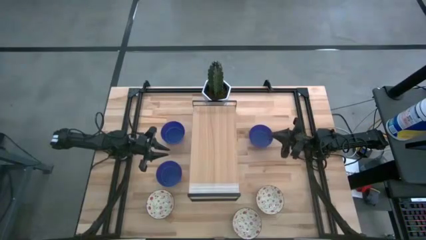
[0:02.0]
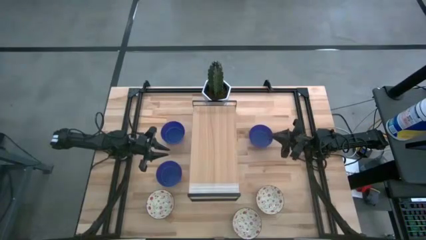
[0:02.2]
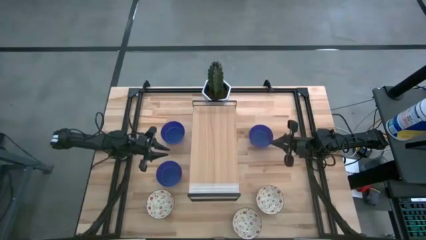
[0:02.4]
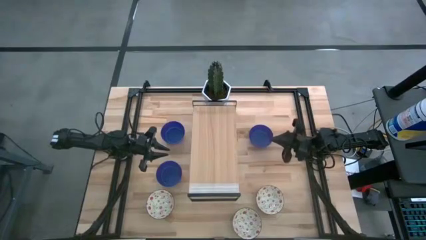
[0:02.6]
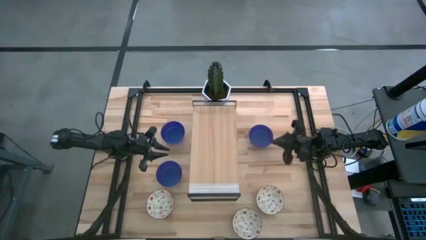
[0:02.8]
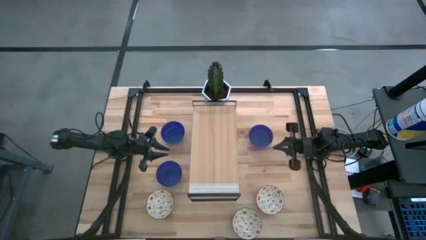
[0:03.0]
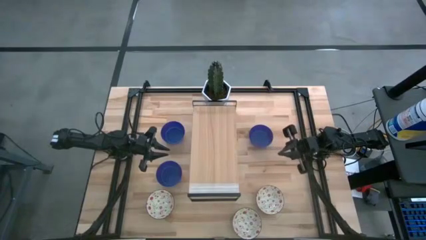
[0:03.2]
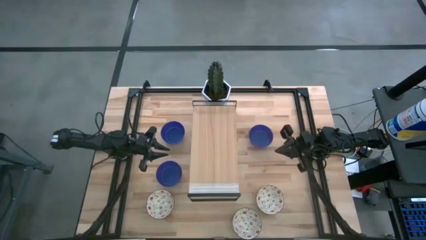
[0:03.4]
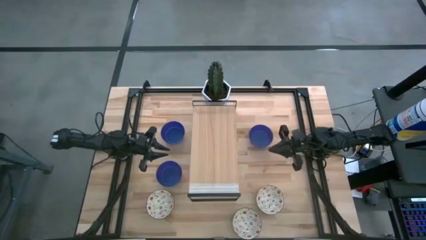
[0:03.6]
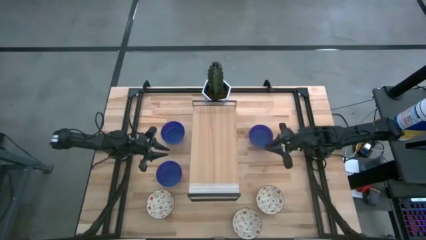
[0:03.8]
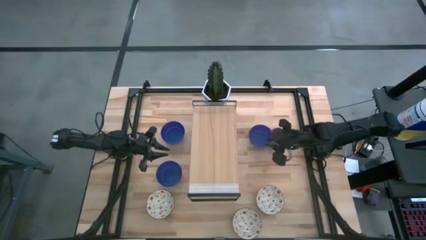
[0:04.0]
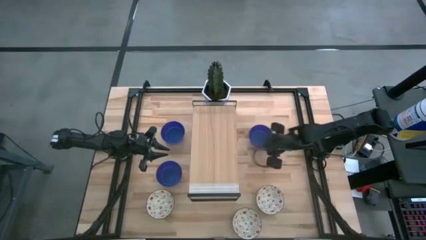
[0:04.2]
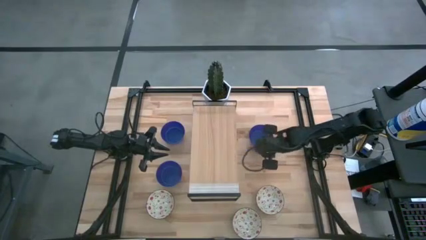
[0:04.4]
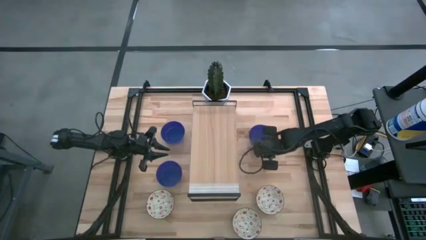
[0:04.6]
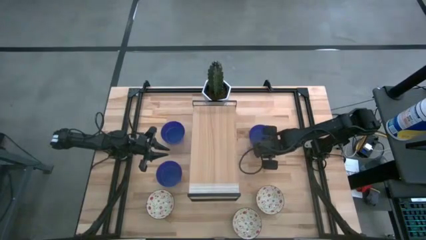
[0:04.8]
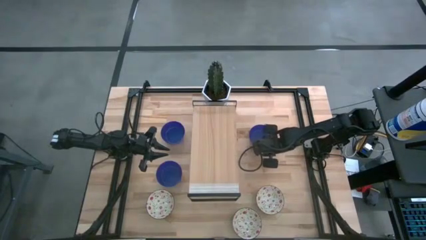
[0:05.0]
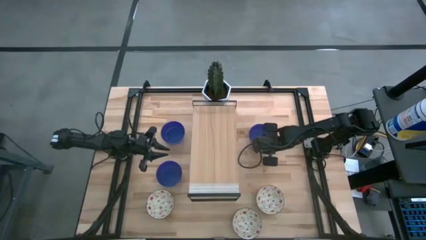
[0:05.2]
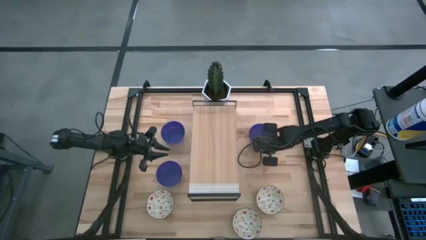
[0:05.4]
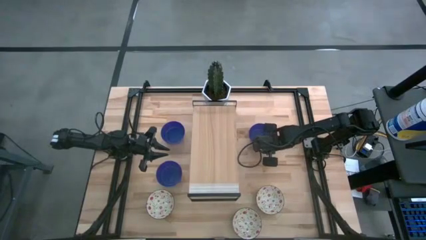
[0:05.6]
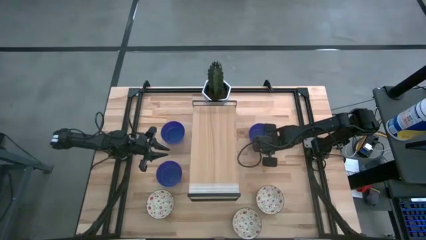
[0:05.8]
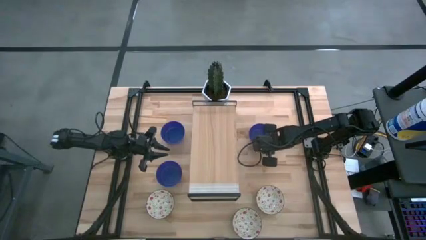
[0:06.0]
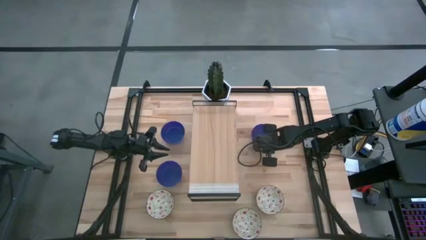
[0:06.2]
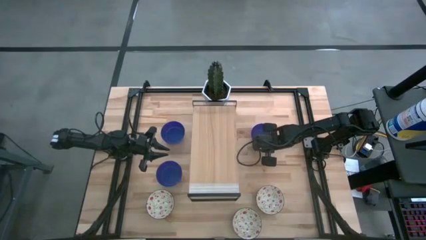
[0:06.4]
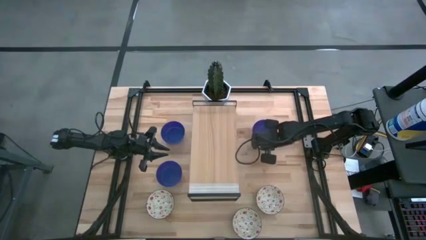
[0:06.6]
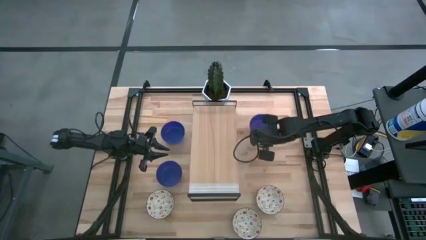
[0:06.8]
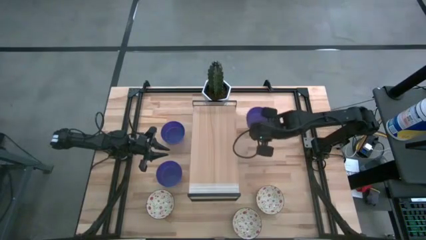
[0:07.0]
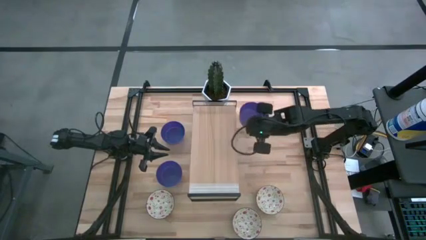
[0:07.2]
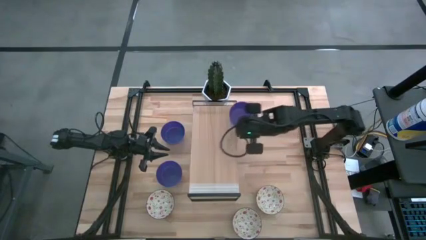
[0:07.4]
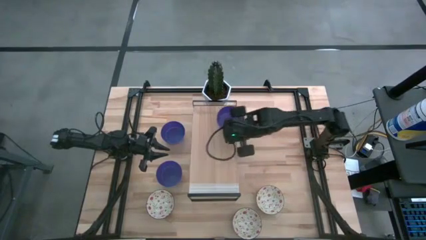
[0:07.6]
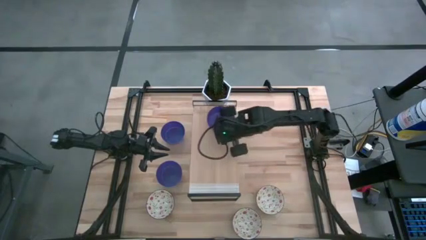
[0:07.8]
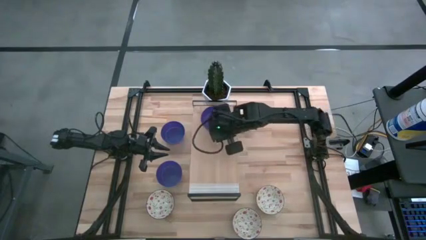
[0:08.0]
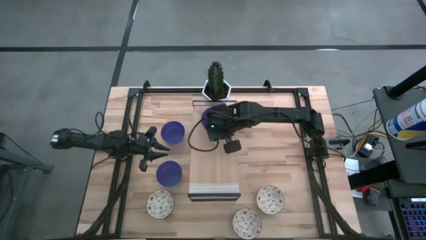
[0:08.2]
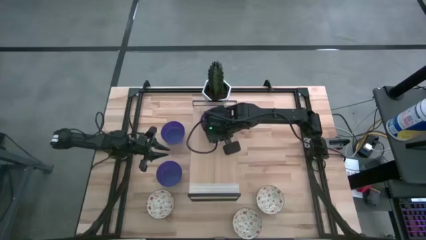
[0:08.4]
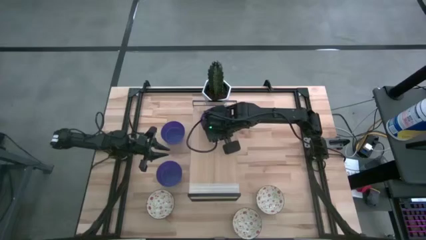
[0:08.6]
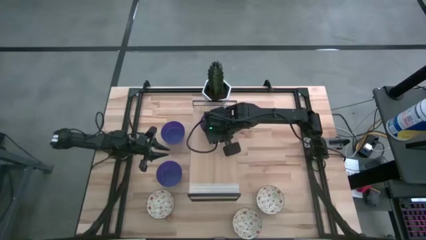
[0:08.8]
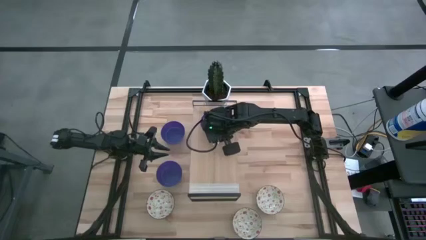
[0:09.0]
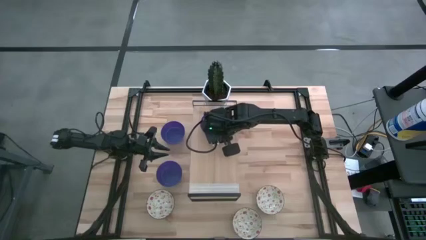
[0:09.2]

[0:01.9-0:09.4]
Task: Pick & Place Mini bowls
Put the top right blue bowl on the shelf

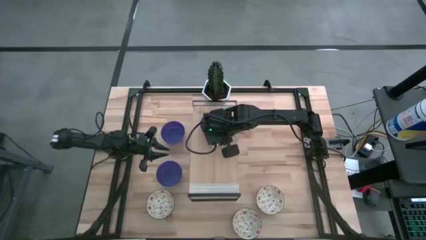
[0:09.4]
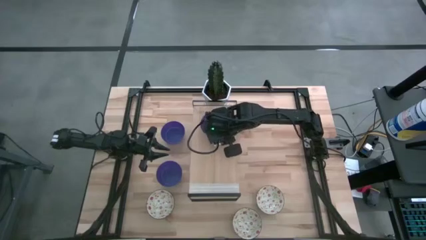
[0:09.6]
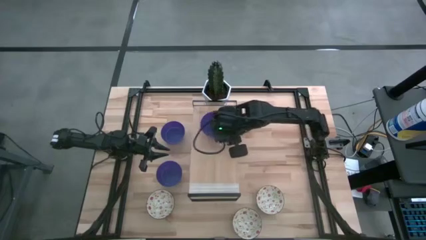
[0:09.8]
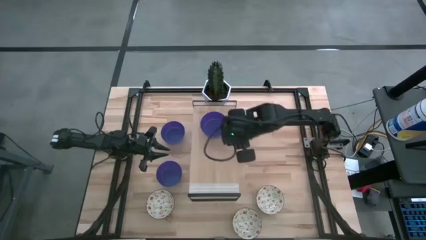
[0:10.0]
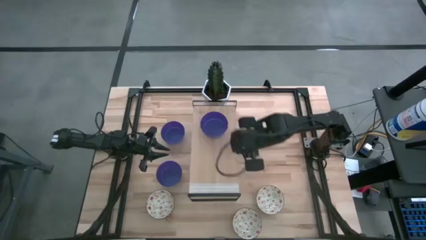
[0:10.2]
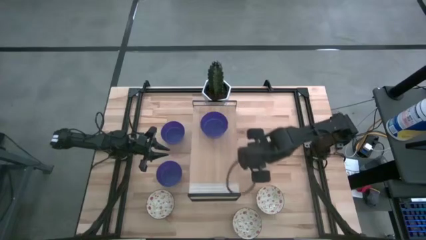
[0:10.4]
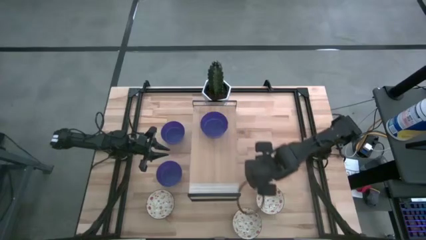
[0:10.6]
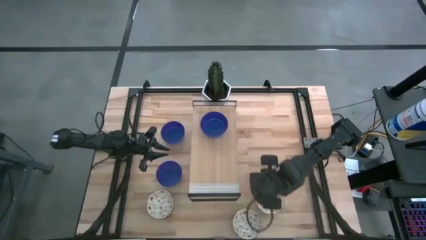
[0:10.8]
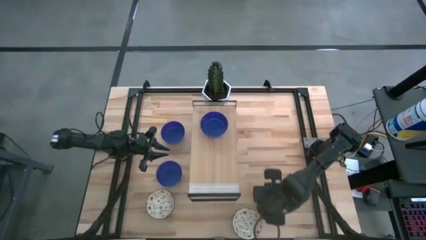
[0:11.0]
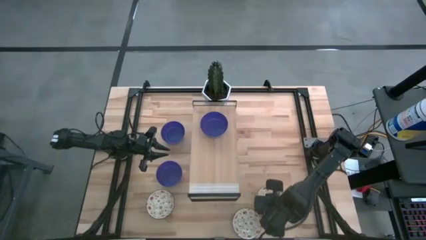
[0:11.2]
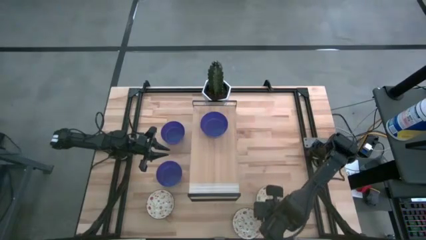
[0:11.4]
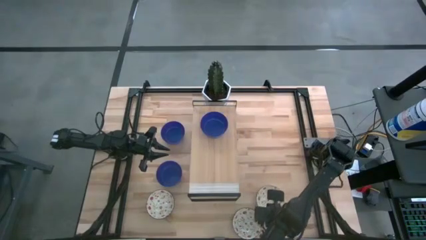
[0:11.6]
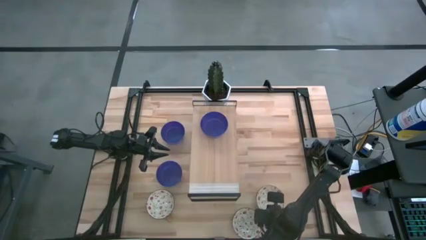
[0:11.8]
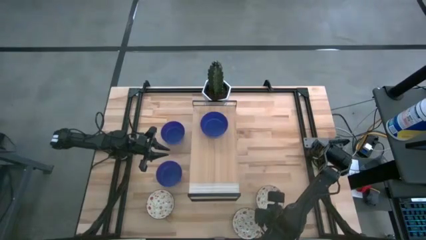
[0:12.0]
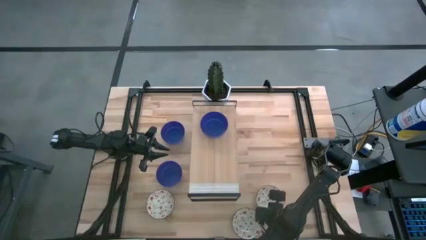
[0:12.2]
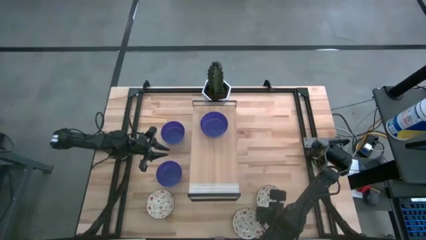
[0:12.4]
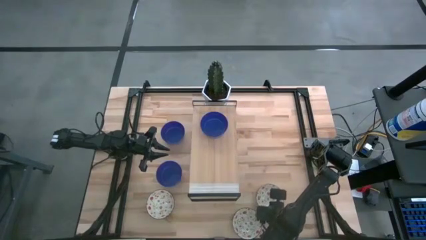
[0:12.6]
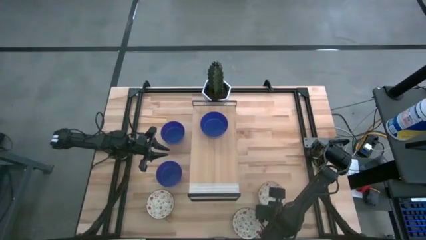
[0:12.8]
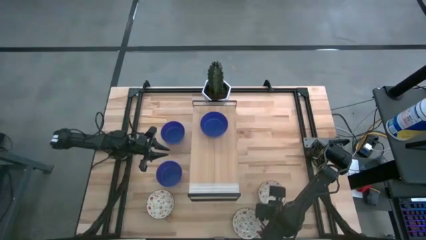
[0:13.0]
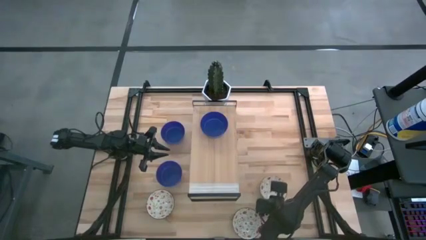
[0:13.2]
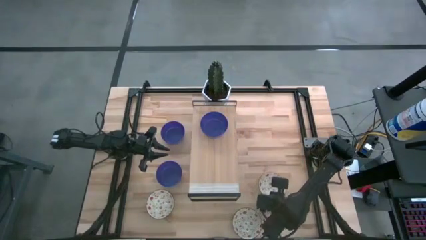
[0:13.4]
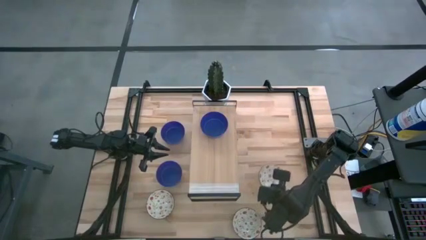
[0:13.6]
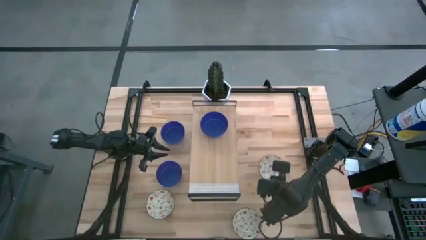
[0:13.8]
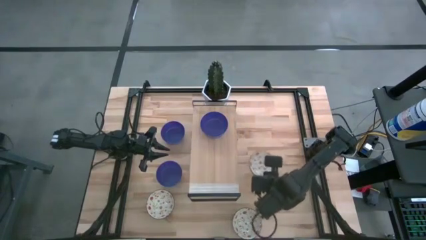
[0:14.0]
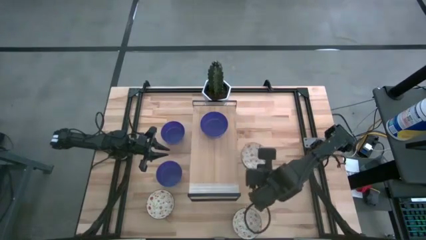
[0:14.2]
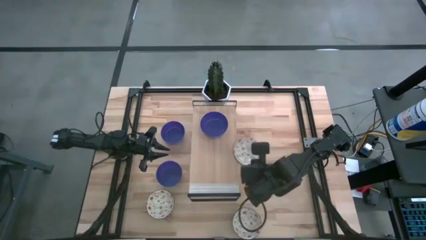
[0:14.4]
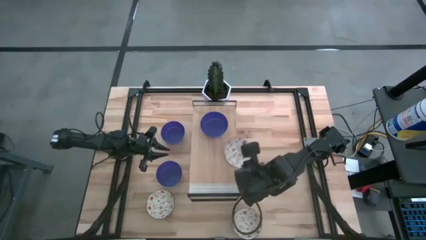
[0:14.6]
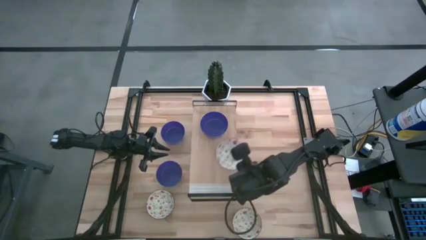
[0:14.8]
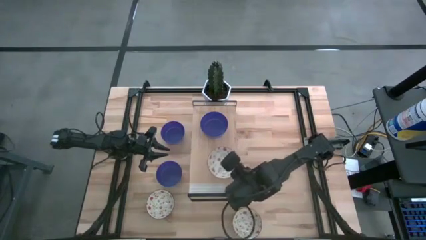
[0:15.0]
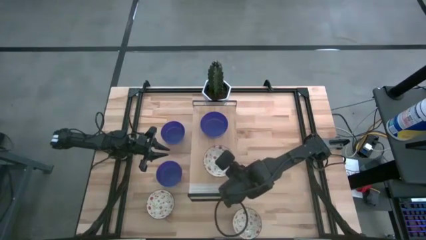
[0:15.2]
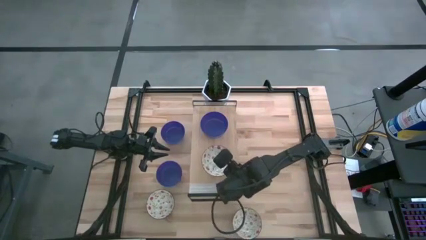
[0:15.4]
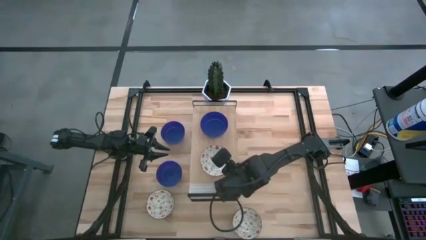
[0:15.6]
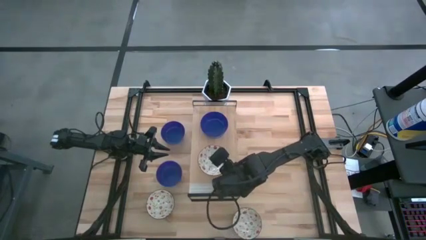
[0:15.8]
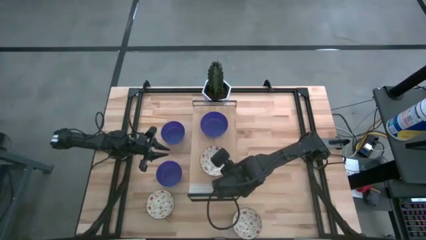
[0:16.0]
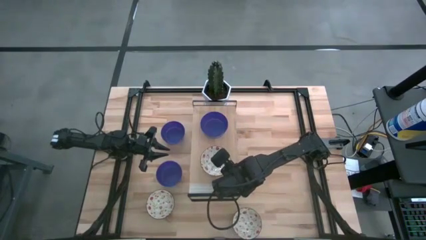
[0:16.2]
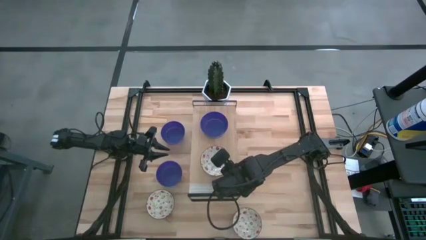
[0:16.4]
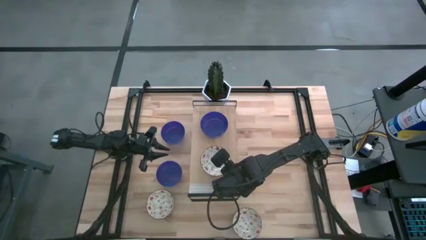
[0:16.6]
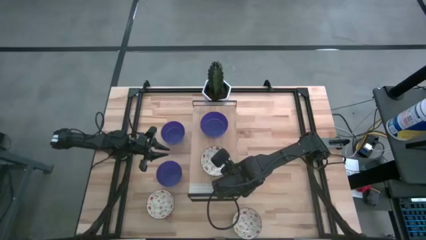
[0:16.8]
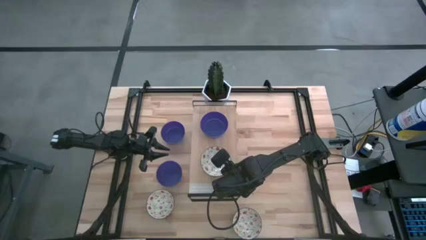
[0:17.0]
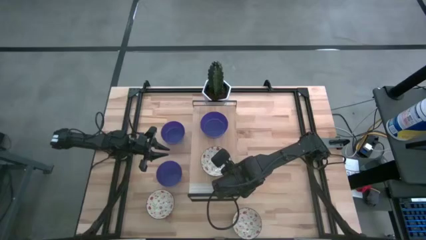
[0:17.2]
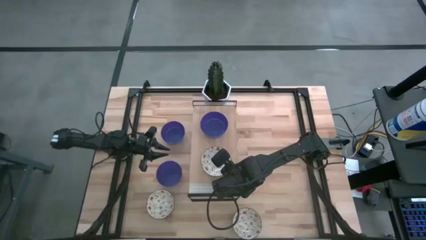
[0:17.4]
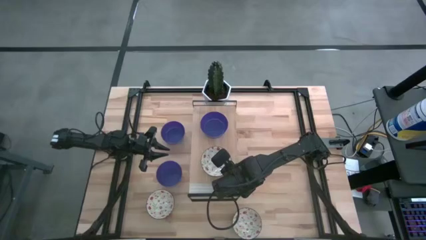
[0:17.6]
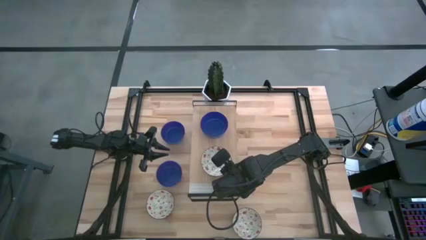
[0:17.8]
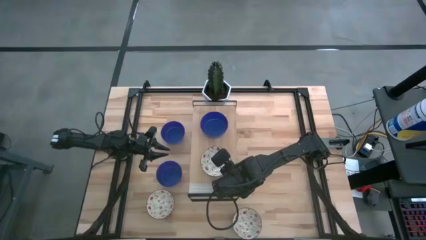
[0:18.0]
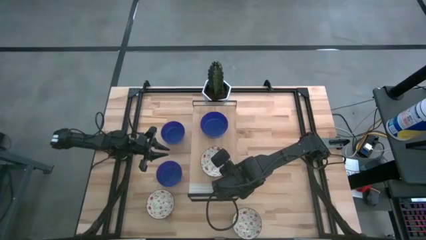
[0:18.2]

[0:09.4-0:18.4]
Put the top right white patterned bowl on the shelf
